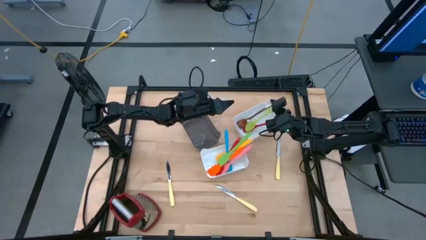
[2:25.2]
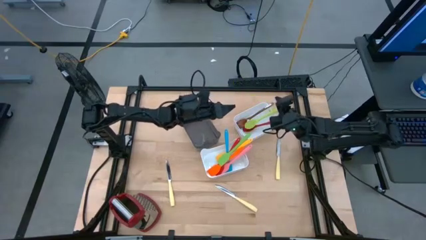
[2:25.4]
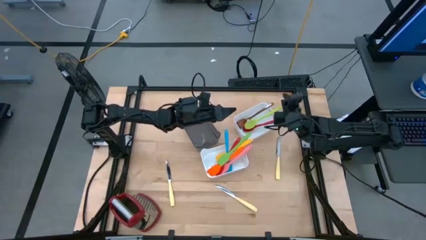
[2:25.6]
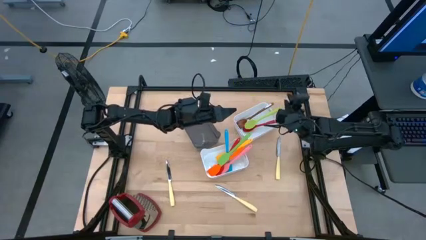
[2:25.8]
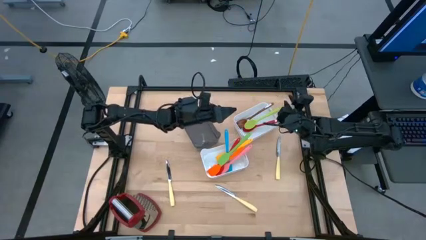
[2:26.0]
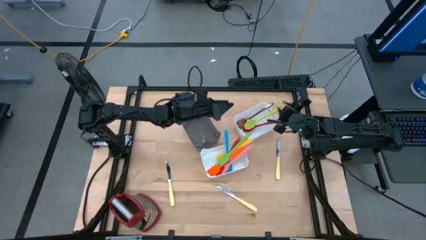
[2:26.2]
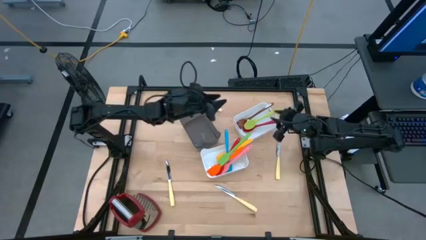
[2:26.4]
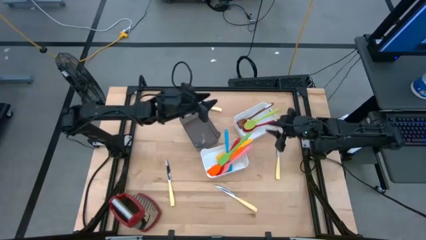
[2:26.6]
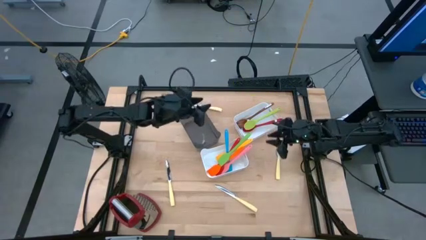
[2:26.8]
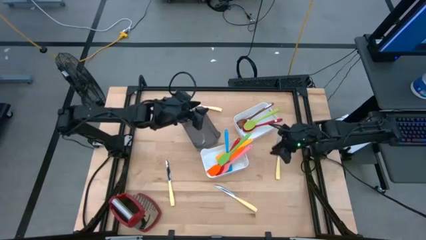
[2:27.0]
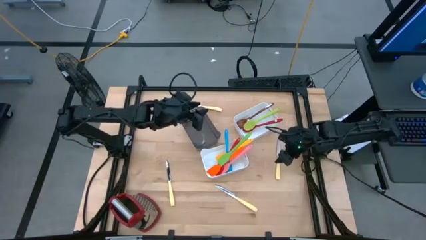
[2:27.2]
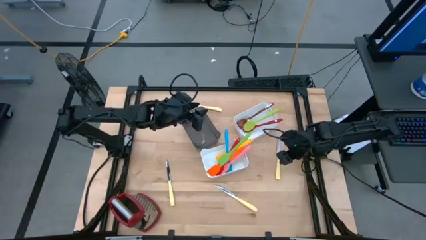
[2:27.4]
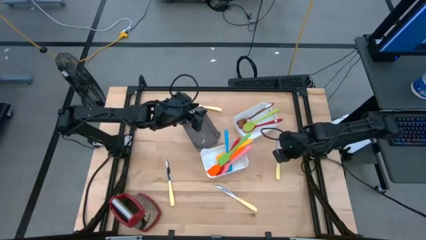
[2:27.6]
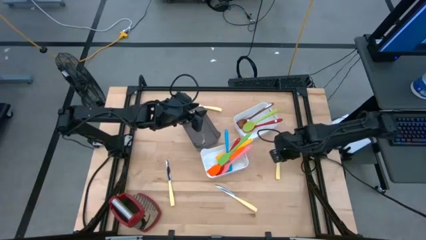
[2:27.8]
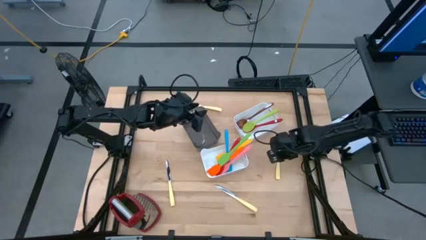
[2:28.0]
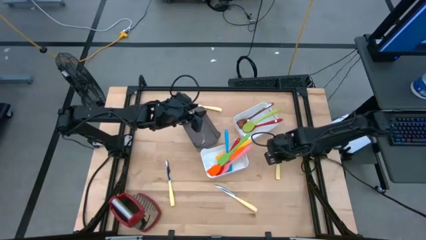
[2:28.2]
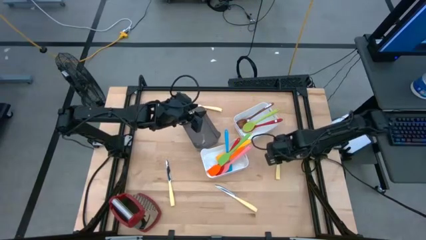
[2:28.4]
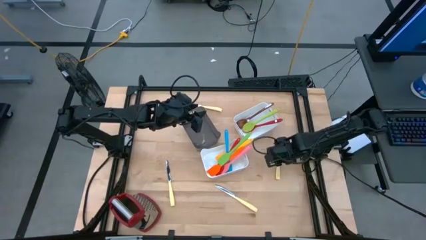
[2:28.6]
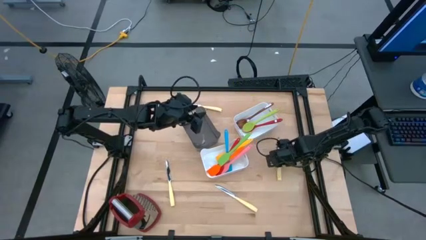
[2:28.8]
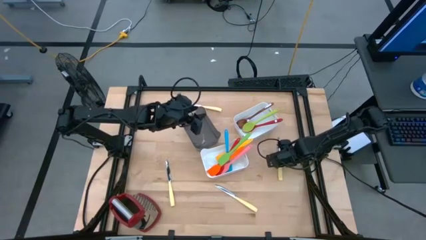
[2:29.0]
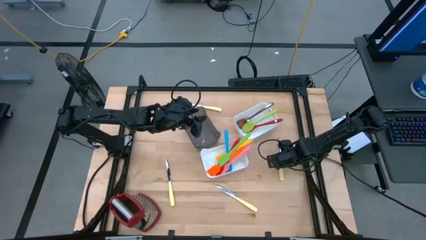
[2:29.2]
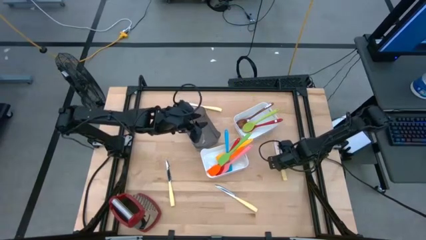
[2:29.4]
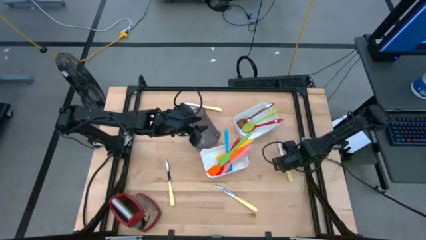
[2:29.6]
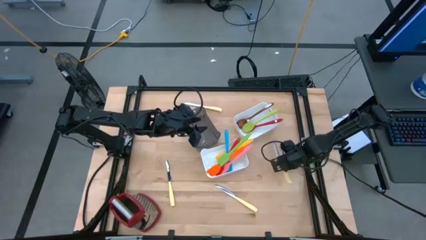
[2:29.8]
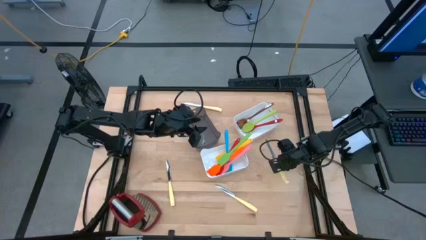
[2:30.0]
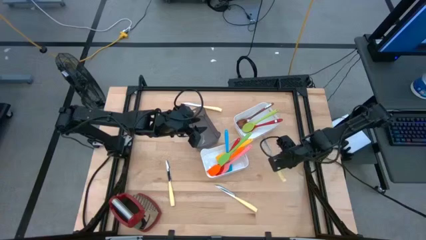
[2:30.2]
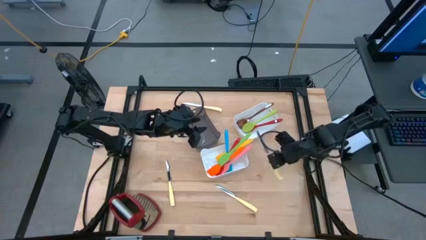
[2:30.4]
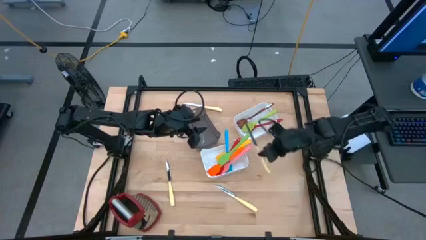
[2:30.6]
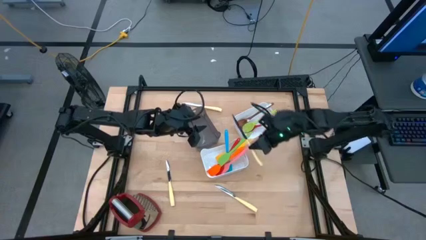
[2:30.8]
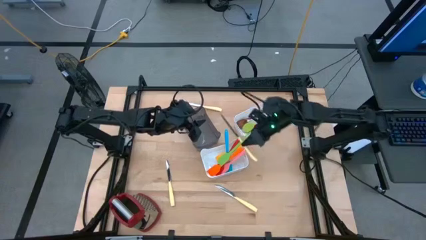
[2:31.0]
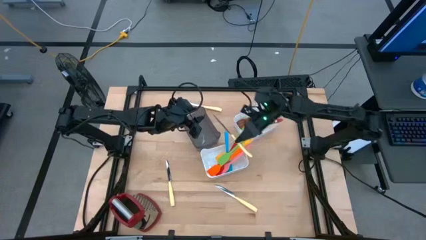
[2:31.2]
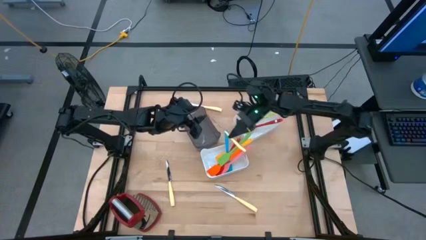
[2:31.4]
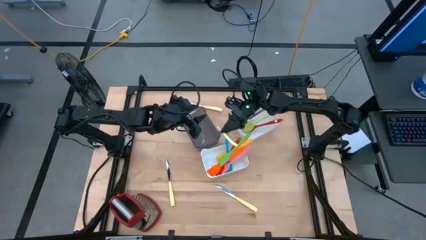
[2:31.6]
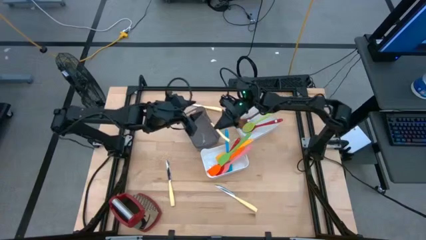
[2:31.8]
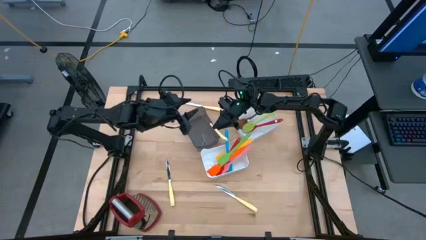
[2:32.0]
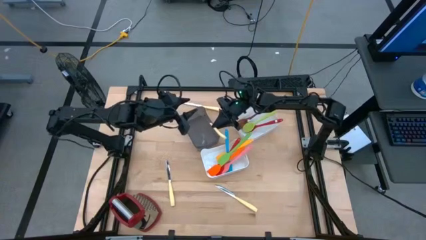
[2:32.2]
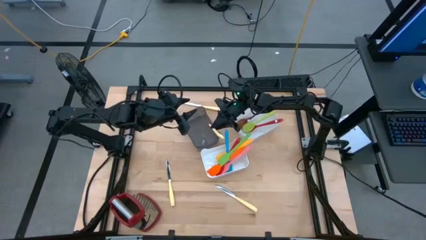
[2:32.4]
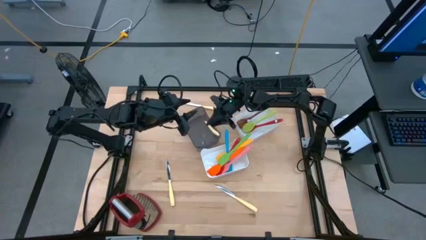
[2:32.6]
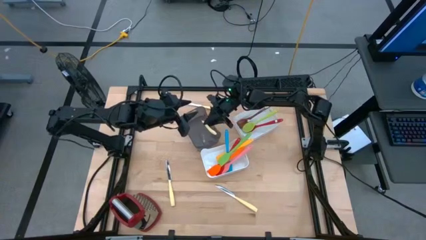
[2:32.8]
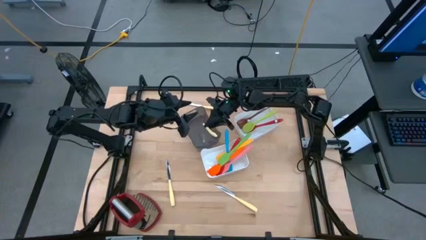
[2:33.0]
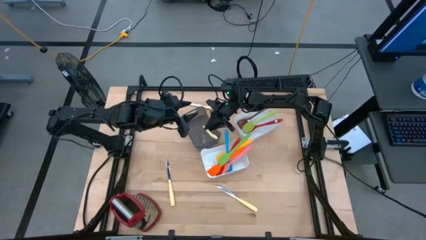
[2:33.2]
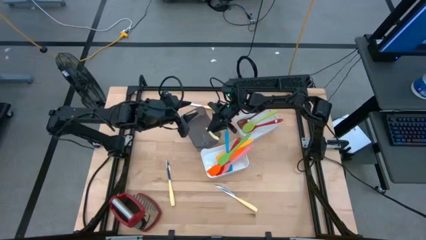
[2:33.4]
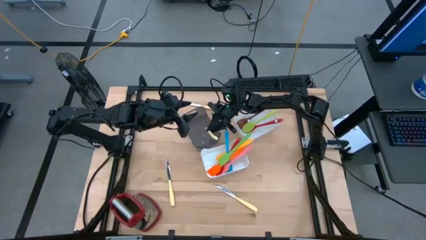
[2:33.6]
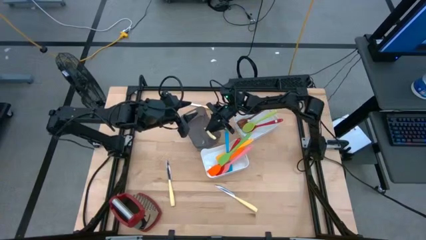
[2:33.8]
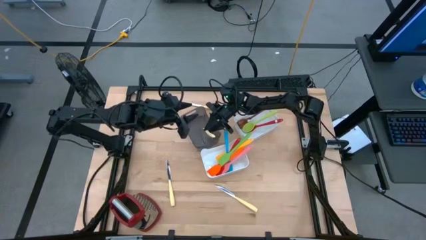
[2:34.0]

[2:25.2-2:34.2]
Task: Pick & Place Kitchen Items
Put the white table knife into the black bin

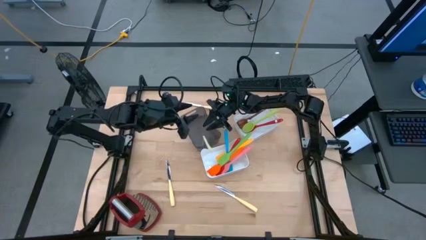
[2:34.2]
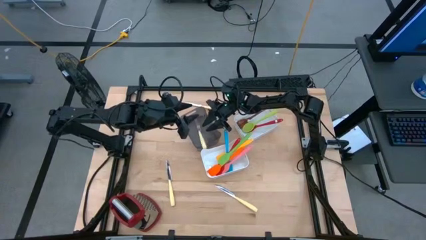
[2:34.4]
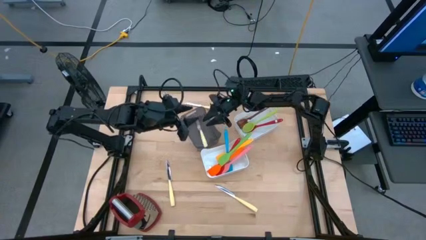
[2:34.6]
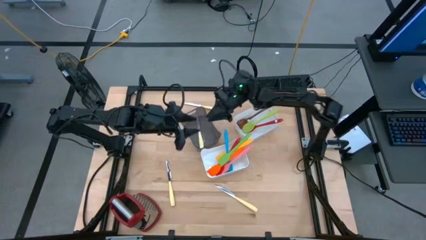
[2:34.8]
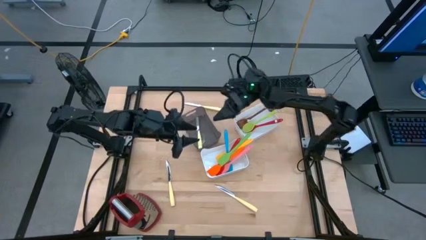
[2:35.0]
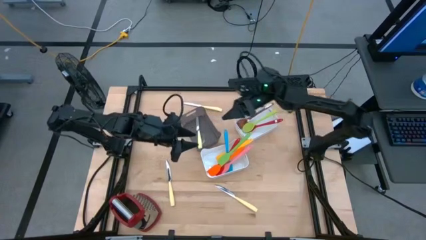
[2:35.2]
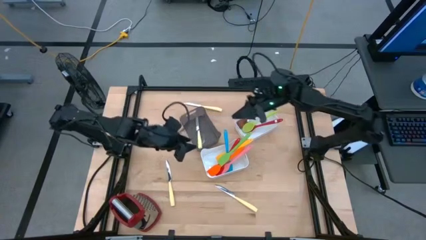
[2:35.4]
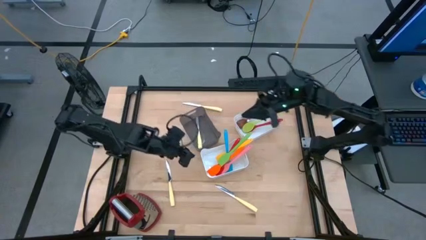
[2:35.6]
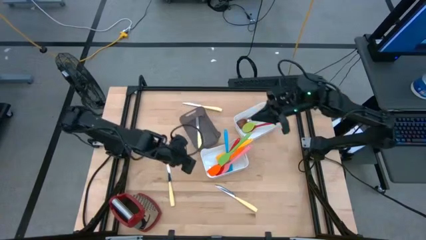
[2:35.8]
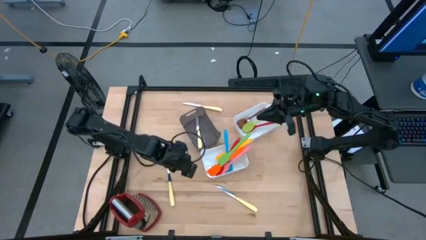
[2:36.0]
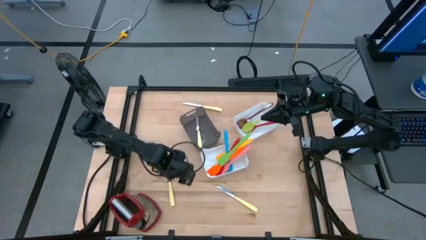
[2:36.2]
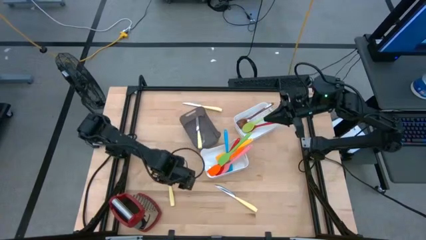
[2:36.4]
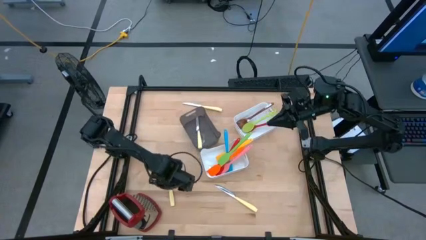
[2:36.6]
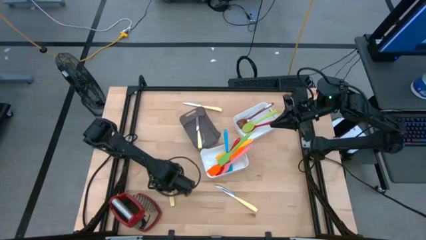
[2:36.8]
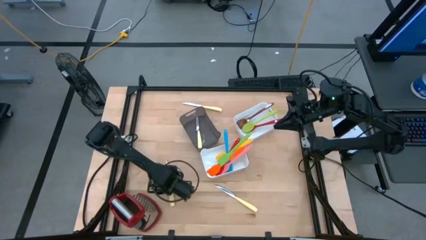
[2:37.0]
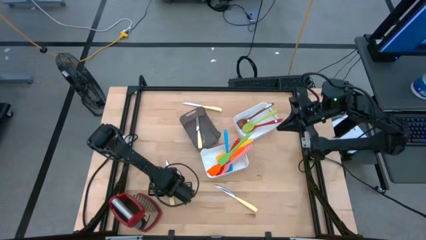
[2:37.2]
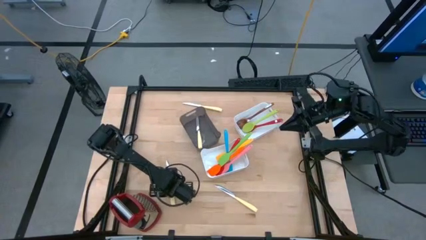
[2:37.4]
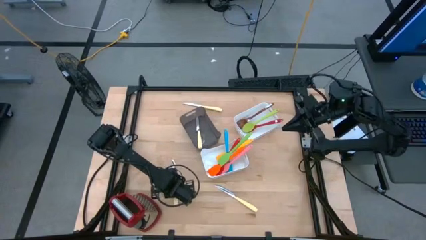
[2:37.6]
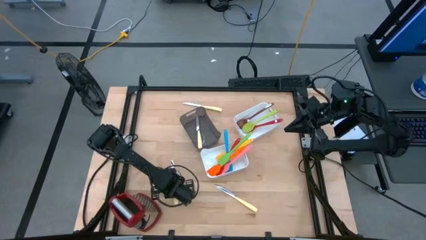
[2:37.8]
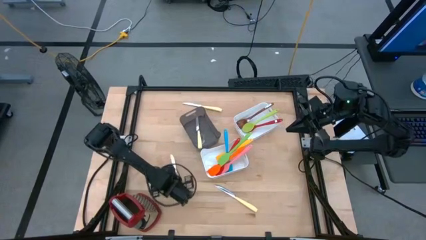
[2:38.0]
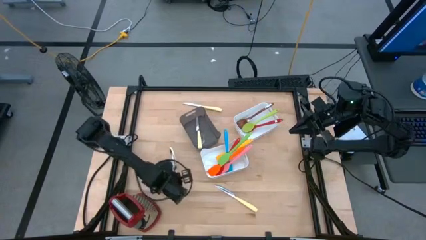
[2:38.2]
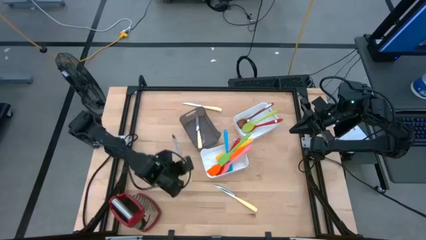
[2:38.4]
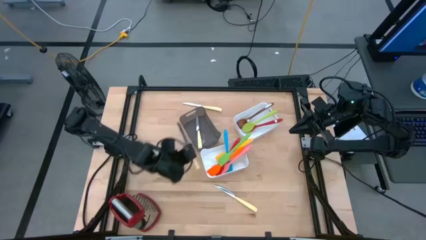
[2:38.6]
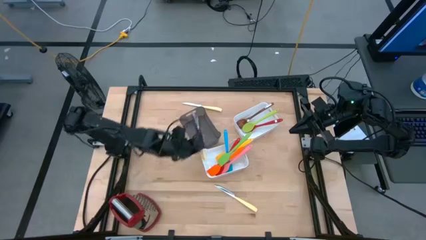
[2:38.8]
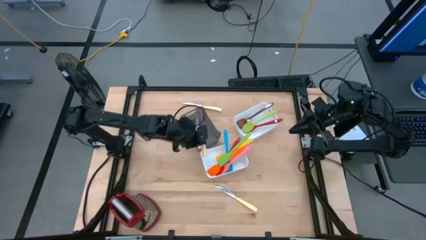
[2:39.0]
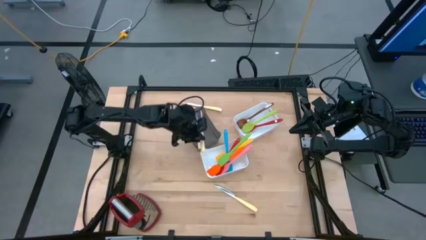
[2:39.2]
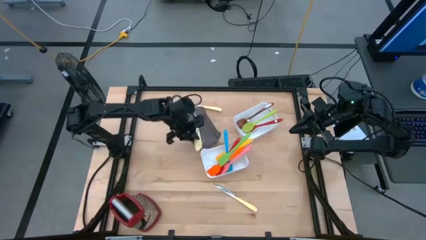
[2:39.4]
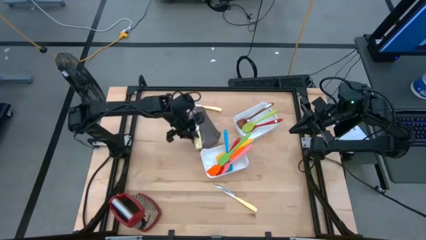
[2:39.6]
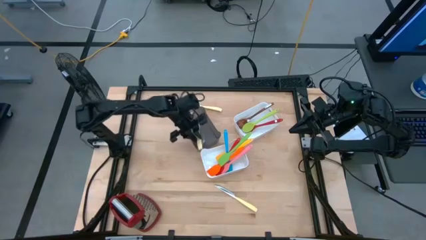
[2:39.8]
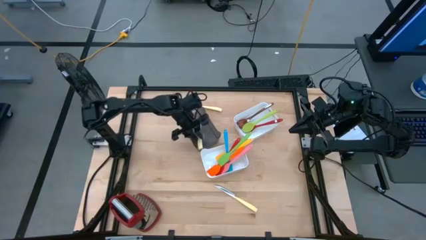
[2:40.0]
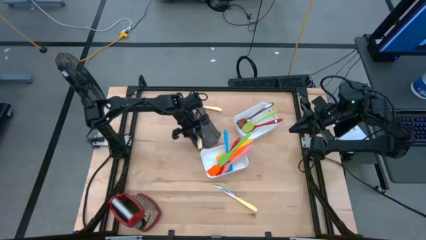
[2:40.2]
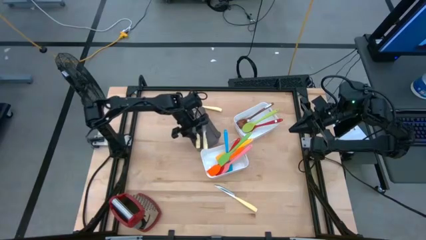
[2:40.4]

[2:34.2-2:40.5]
Put the white table knife into the black bin

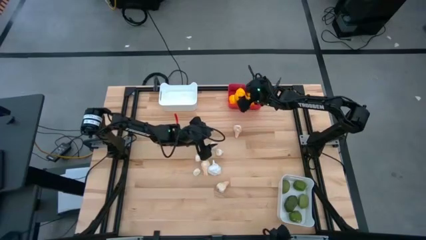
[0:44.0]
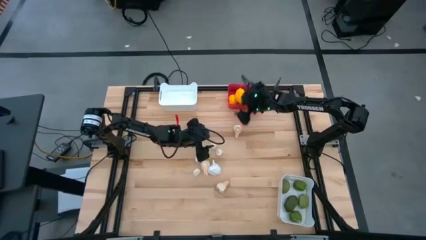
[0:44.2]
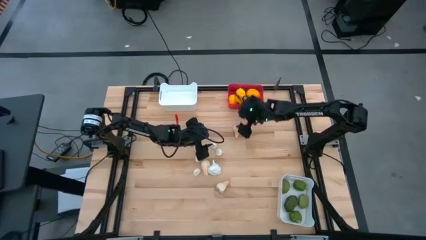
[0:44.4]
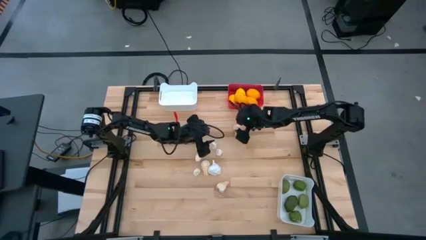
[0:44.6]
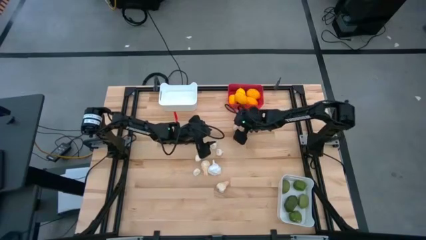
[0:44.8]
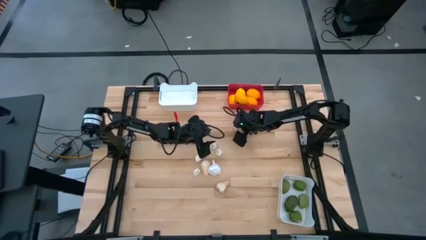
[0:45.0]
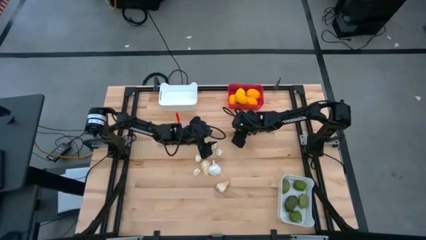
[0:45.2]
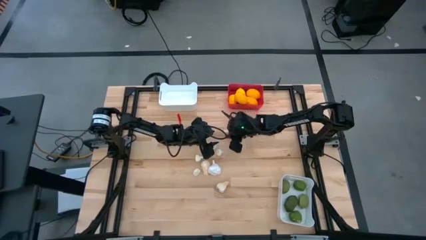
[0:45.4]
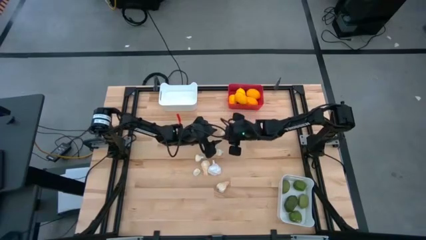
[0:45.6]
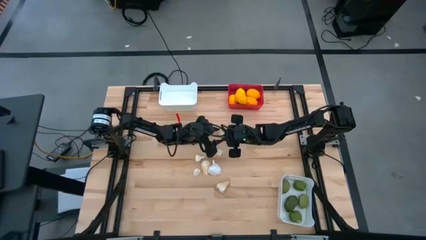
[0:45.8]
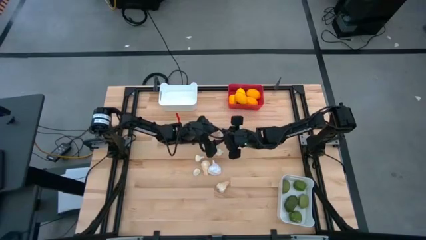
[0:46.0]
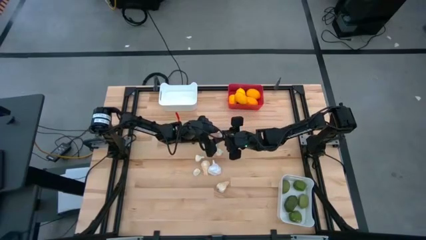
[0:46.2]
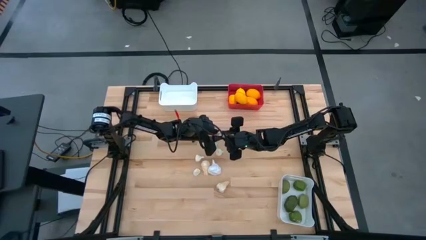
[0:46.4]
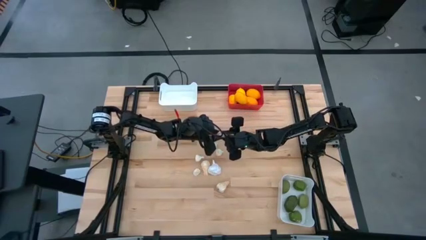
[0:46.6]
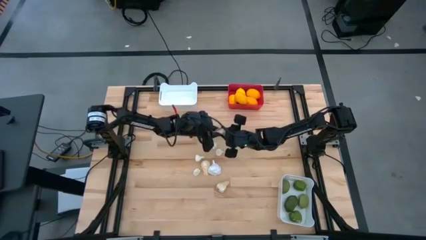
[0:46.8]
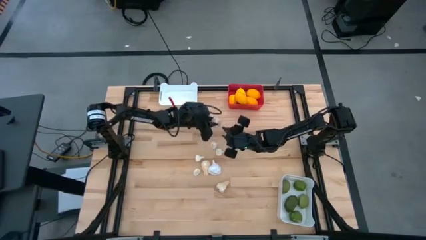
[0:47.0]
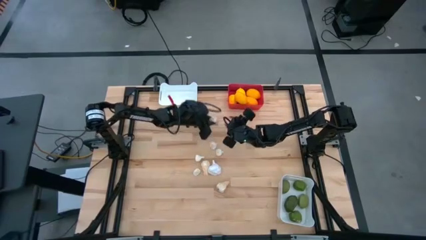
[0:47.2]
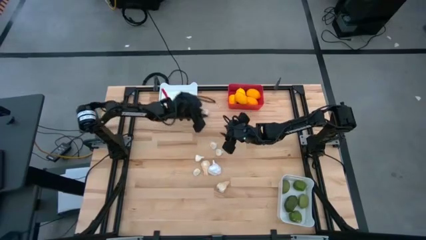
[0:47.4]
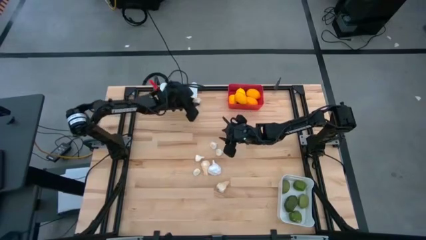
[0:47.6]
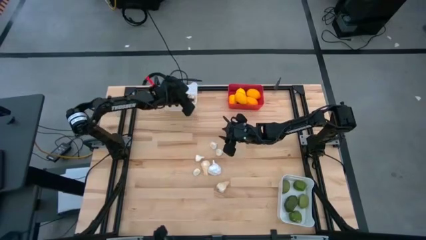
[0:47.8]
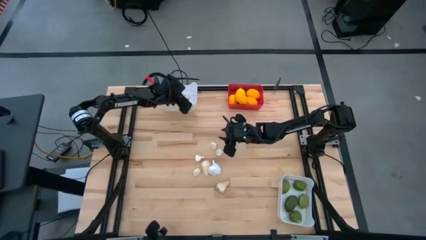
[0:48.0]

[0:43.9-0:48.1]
Task: Sort produce into baskets
Put the white garlic into the top white bin
